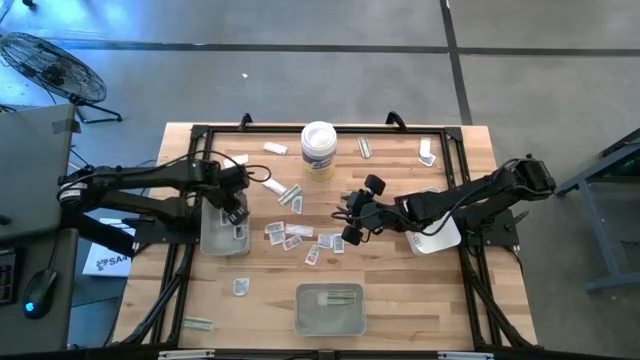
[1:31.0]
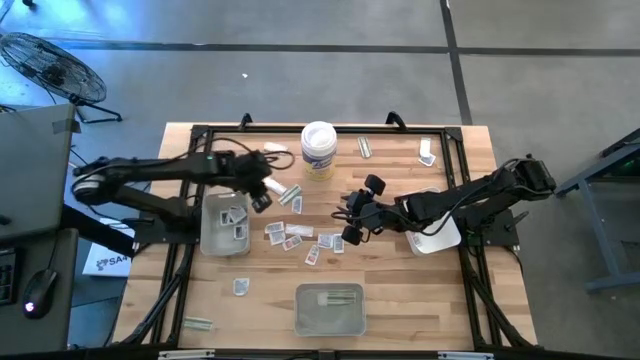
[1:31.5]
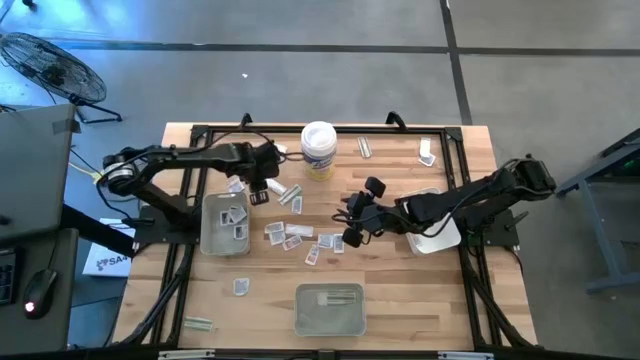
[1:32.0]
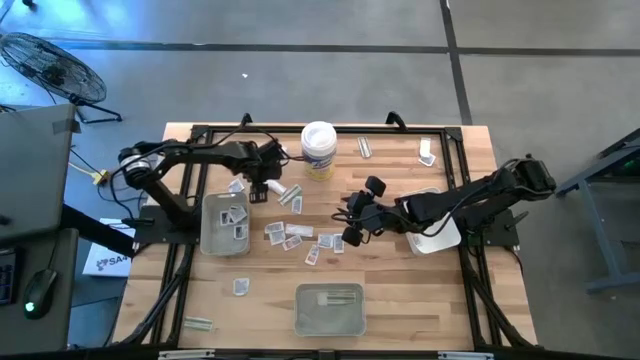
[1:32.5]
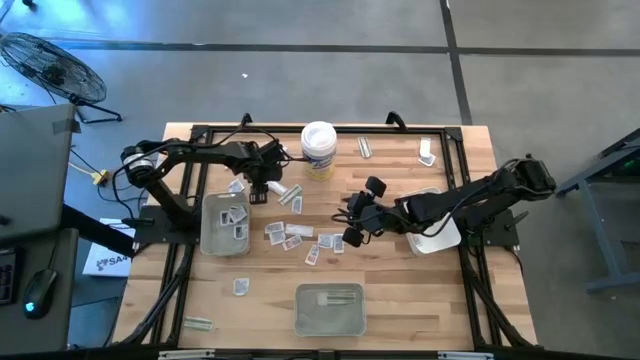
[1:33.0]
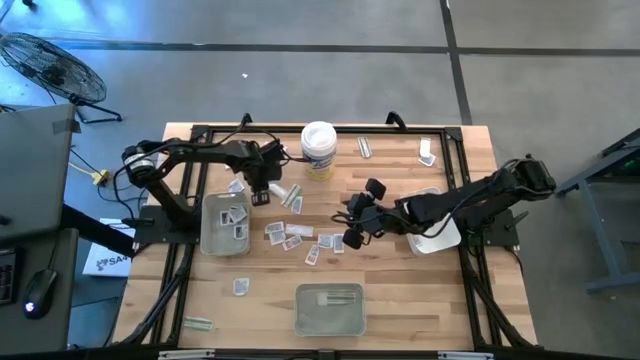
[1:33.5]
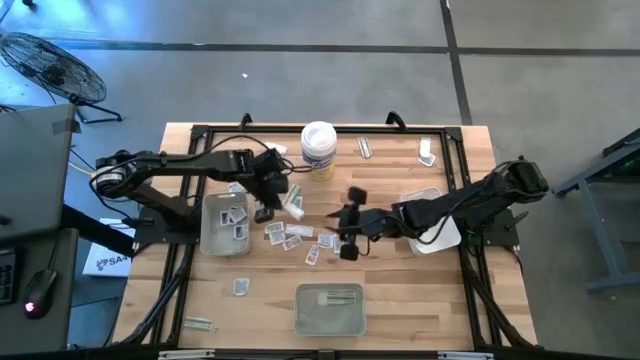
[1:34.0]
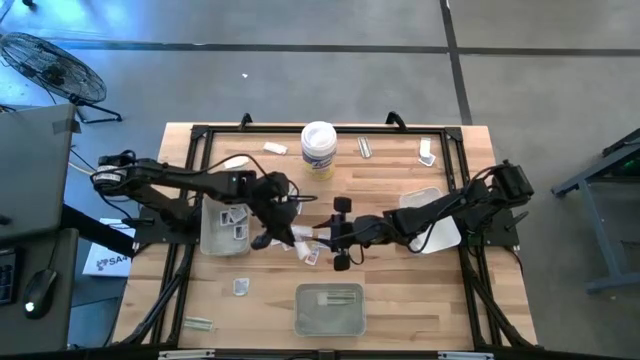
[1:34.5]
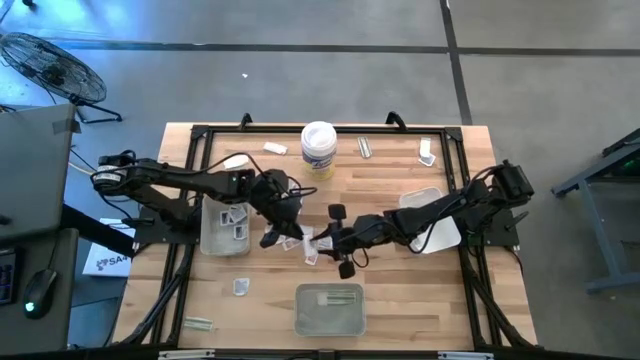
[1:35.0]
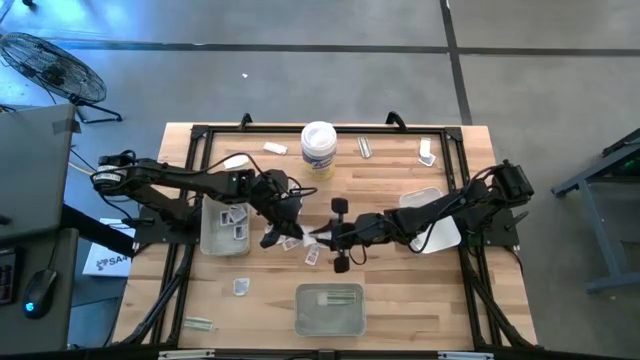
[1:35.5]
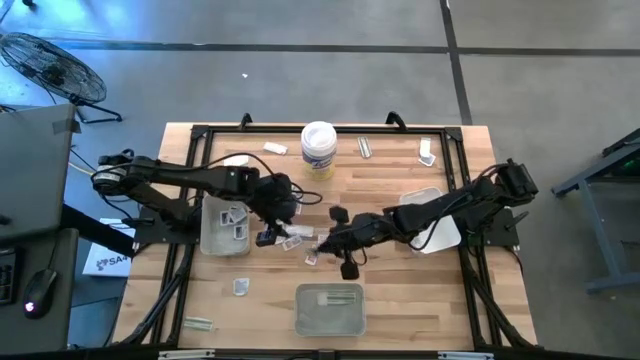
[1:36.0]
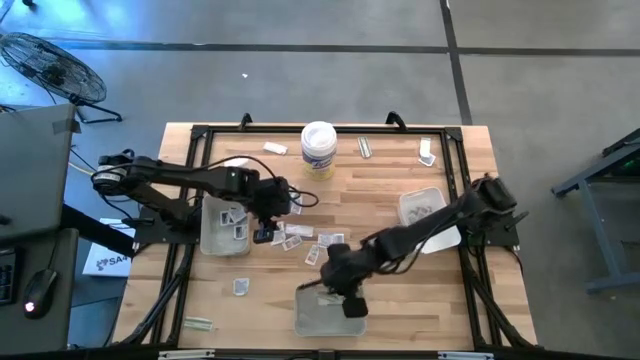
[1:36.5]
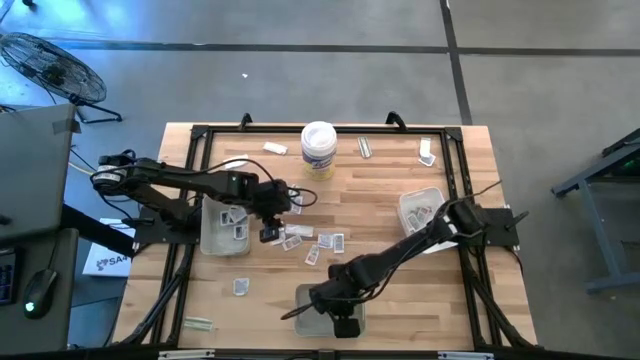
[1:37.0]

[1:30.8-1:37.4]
Task: Pick & Place First Aid Supplies
Put the green bandage pack into the bottom gray bin

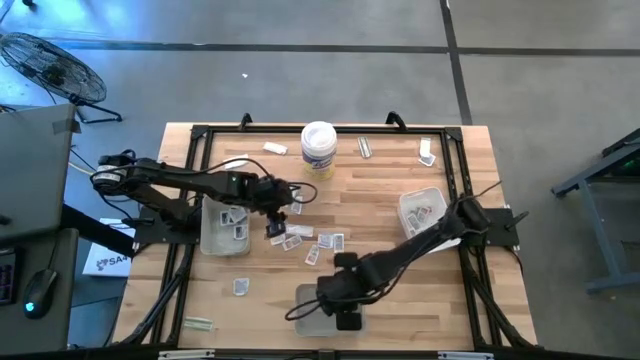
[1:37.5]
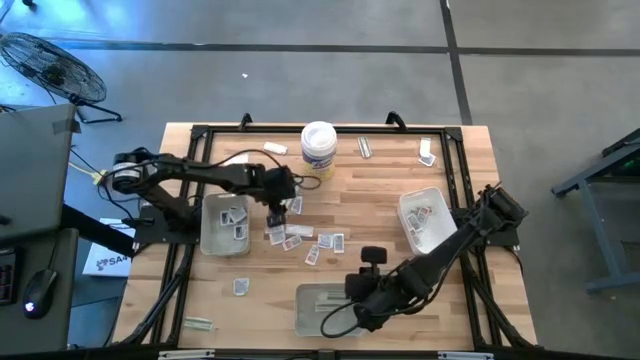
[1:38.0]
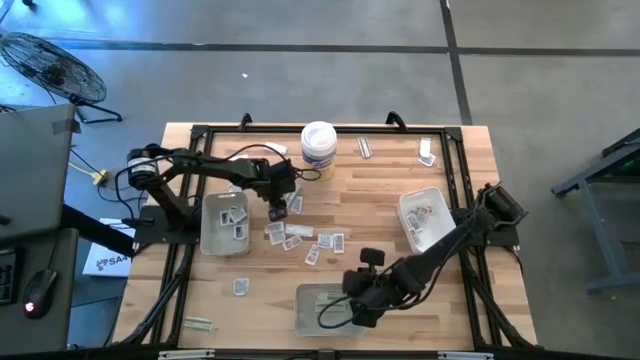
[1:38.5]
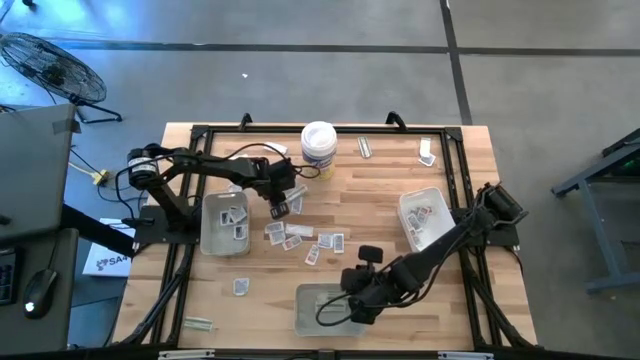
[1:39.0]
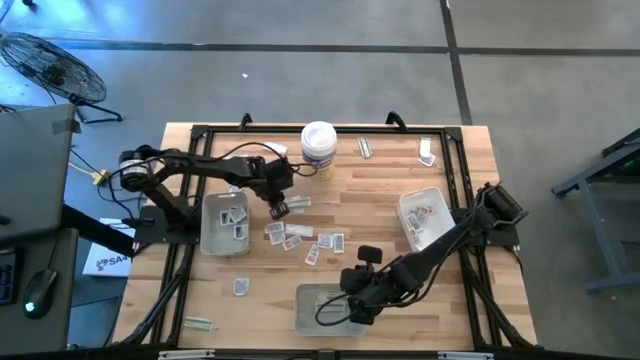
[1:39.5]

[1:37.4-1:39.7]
Put the green bandage pack into the bottom gray bin

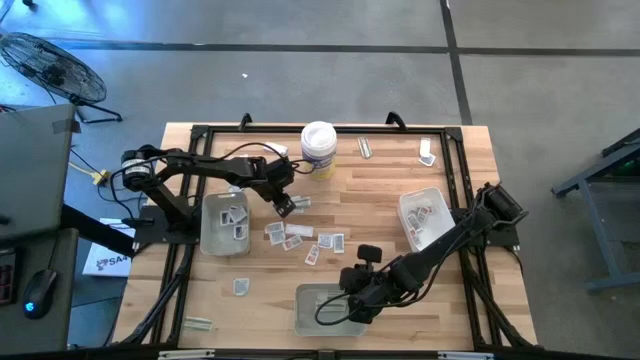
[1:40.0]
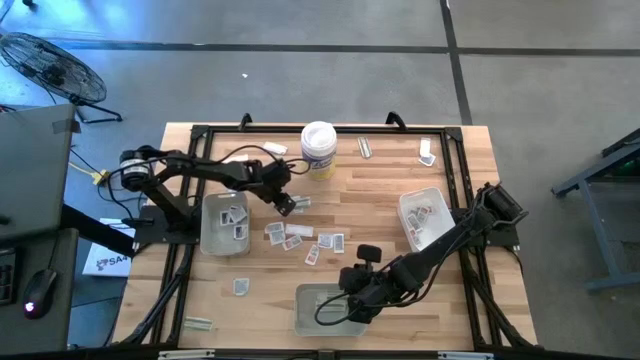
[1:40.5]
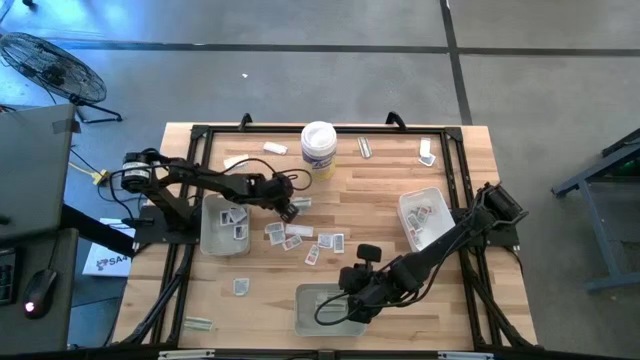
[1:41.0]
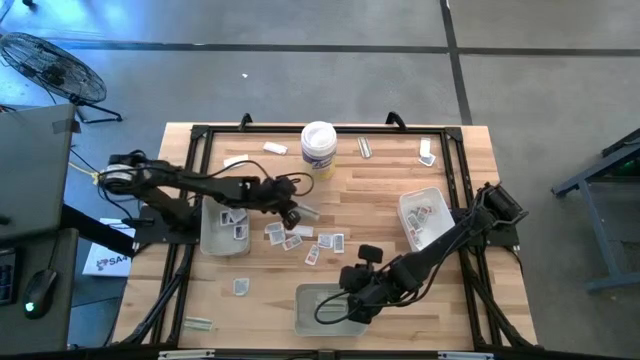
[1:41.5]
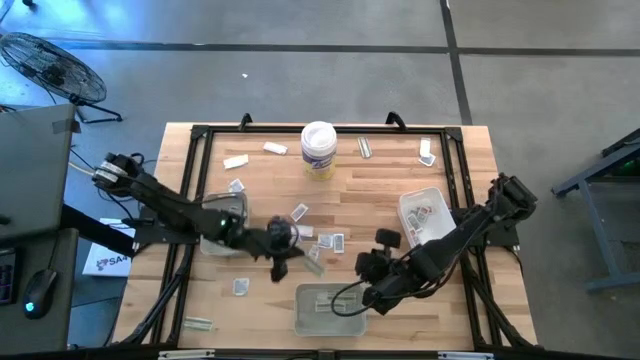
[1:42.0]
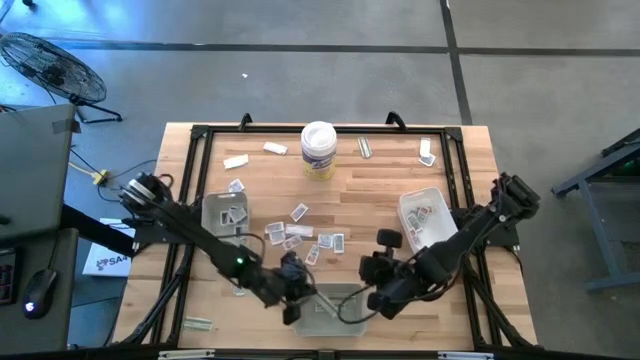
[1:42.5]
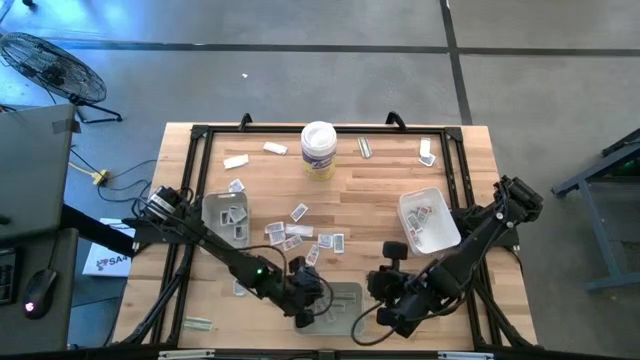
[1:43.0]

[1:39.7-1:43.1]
Put the green bandage pack into the bottom gray bin

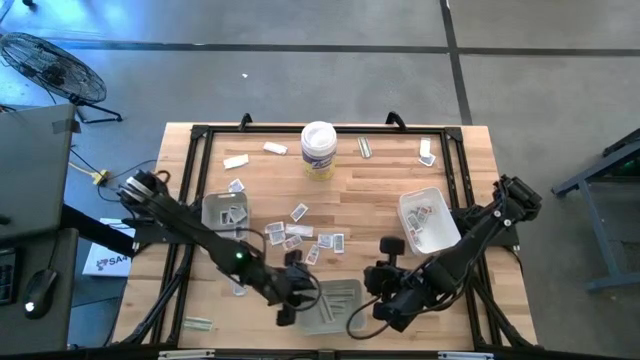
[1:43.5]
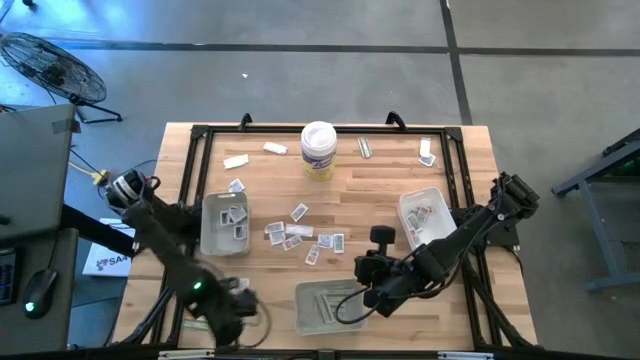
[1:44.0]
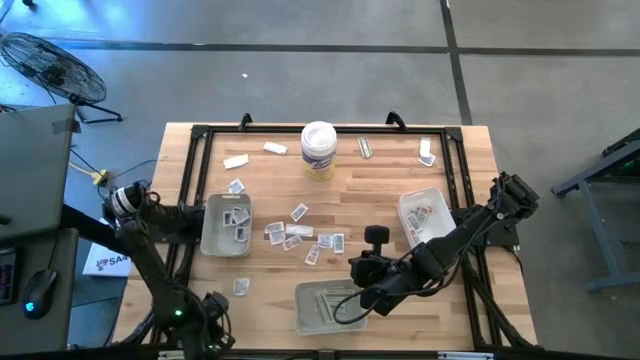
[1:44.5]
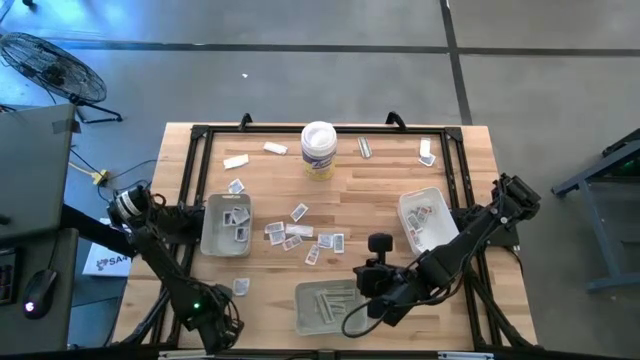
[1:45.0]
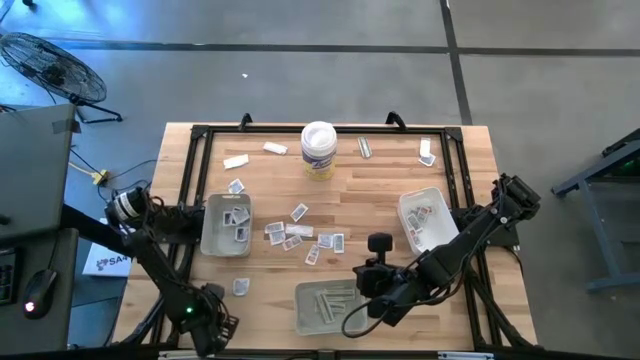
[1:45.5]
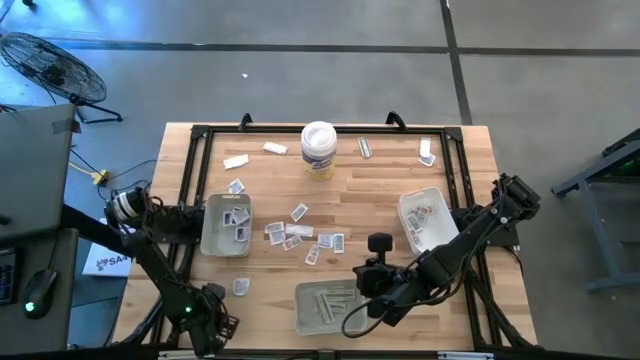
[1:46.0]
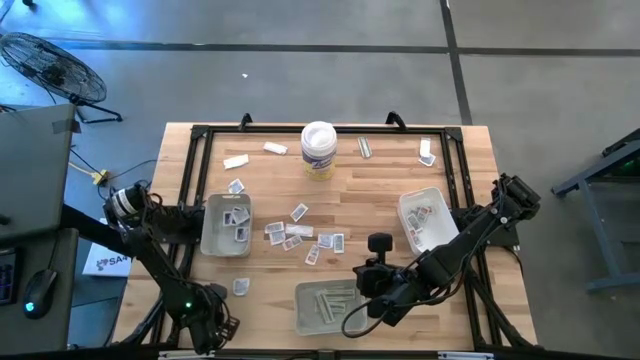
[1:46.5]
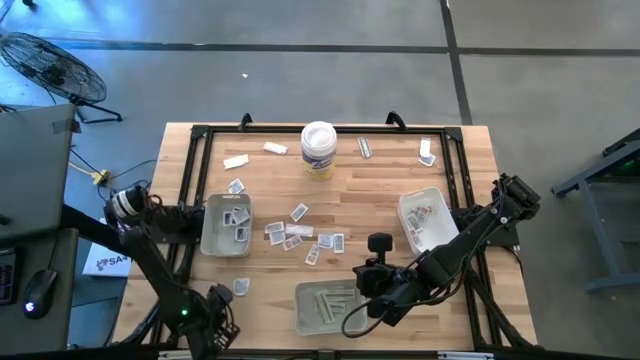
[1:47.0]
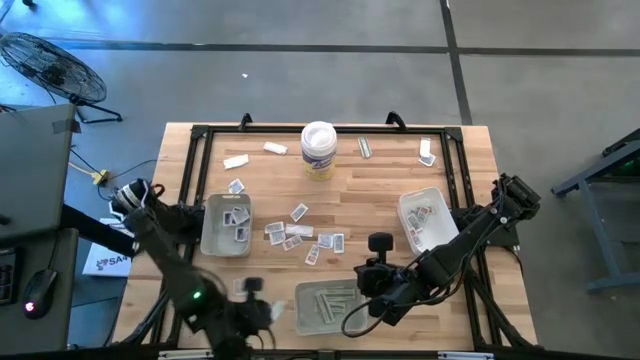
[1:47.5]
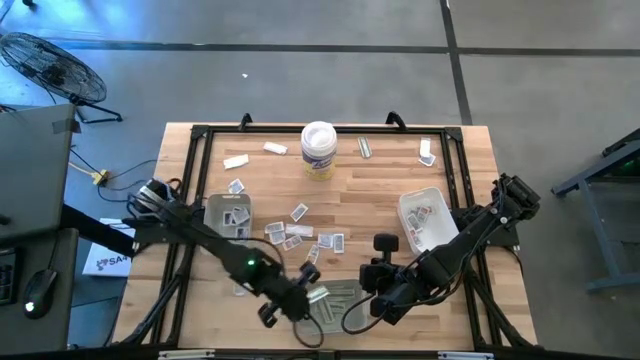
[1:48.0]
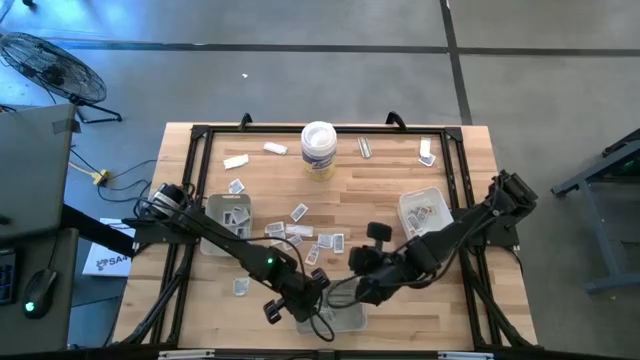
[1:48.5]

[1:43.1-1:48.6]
Put the green bandage pack into the bottom gray bin

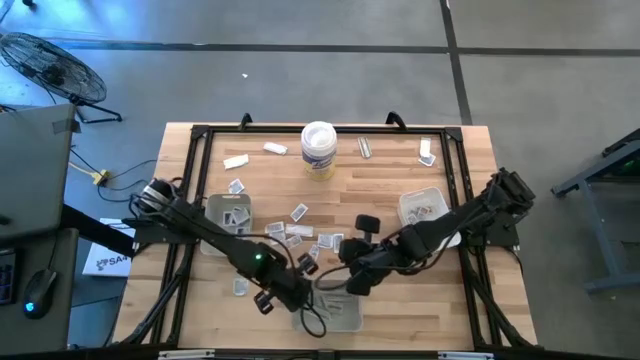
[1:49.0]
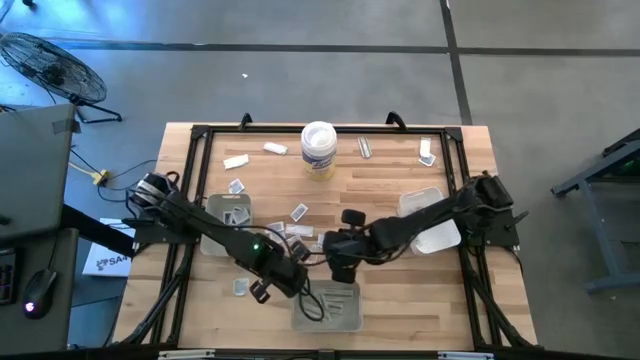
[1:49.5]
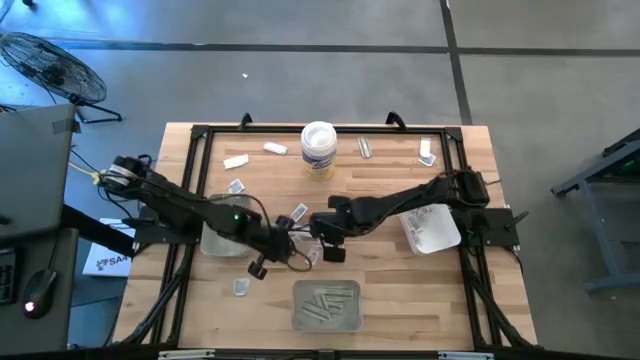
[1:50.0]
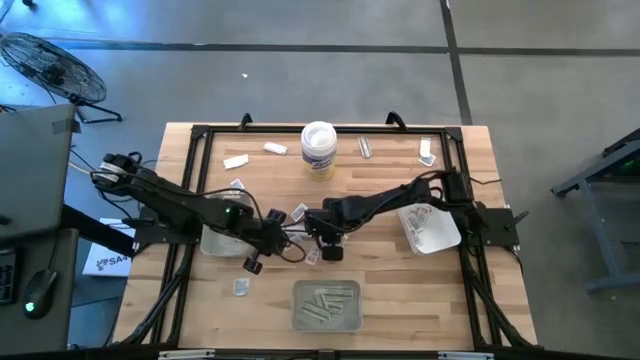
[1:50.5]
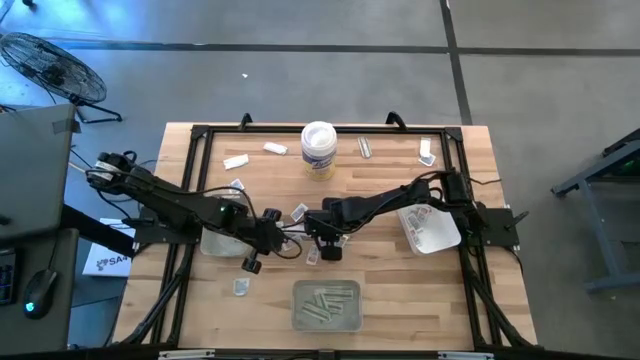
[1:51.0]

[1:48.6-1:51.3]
Put the blue alcohol pad into the top gray bin
